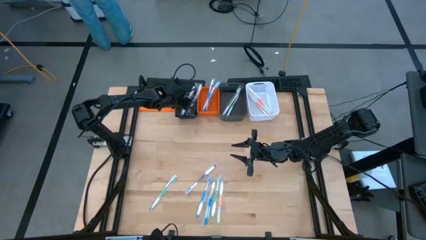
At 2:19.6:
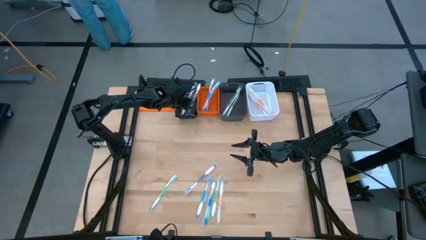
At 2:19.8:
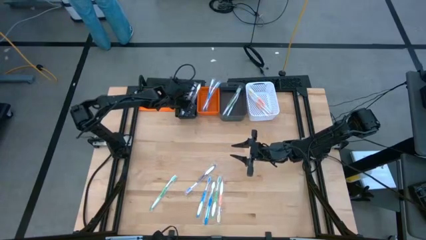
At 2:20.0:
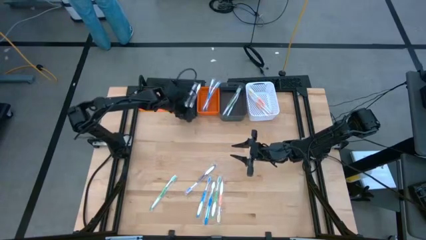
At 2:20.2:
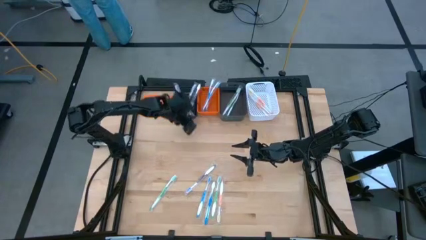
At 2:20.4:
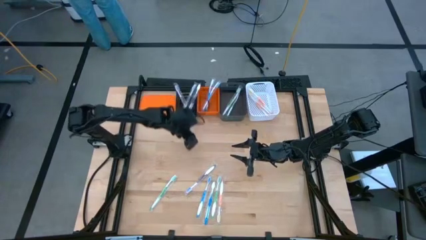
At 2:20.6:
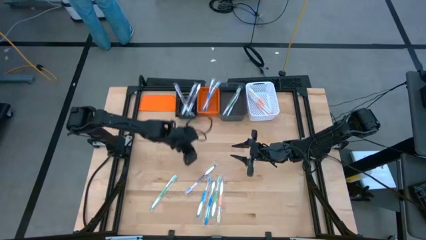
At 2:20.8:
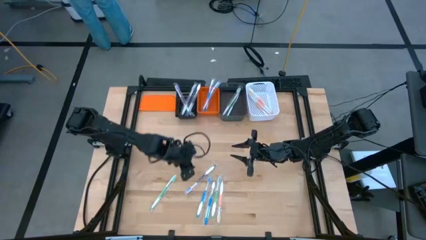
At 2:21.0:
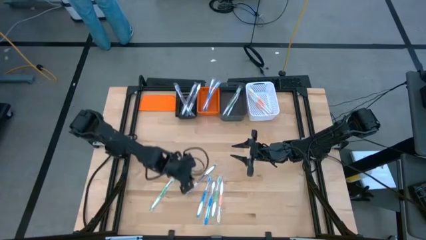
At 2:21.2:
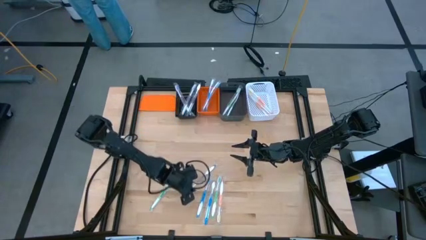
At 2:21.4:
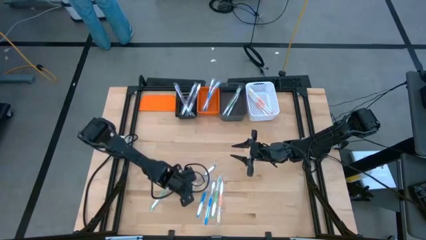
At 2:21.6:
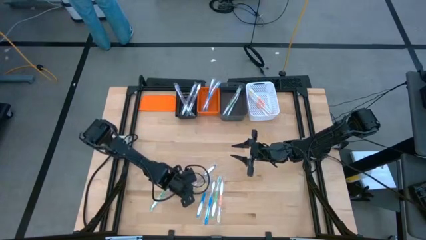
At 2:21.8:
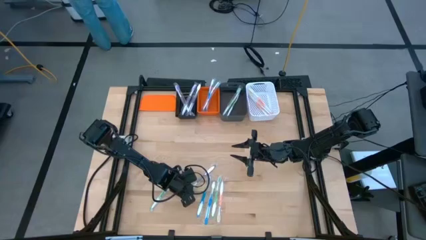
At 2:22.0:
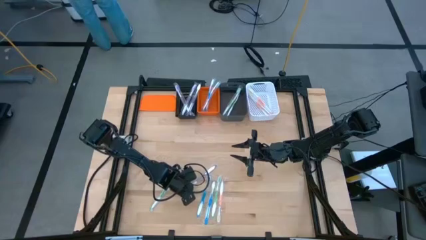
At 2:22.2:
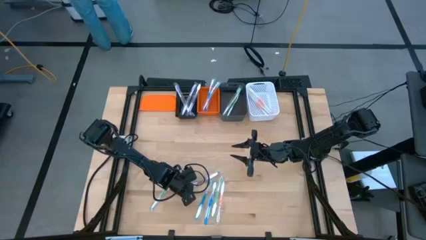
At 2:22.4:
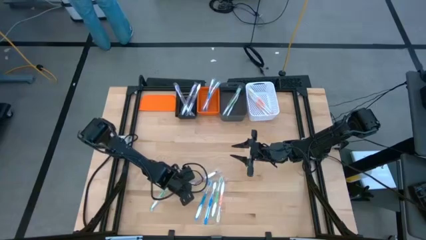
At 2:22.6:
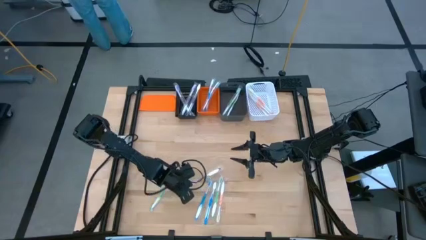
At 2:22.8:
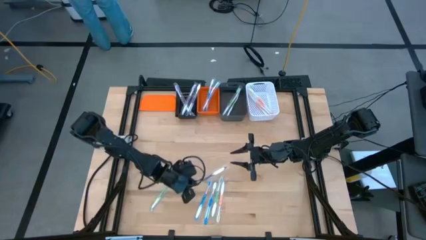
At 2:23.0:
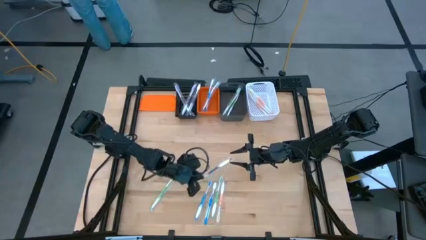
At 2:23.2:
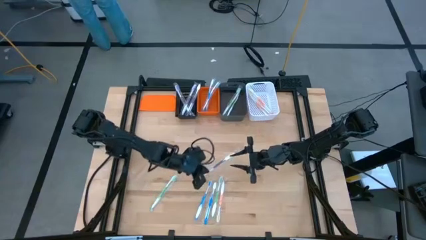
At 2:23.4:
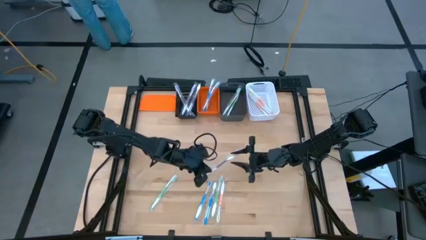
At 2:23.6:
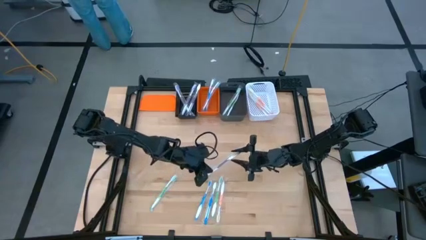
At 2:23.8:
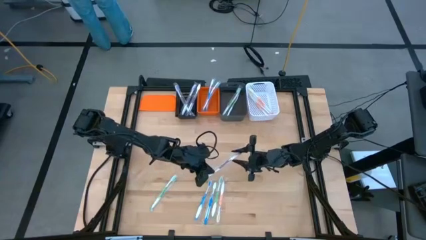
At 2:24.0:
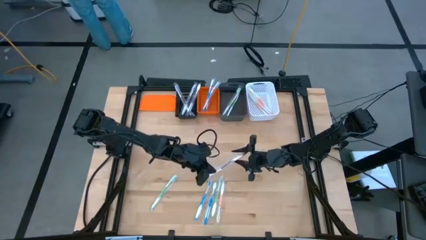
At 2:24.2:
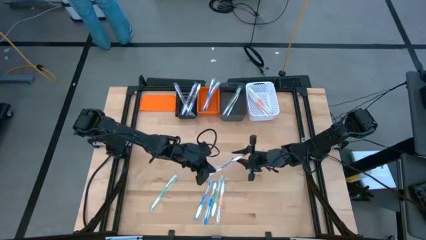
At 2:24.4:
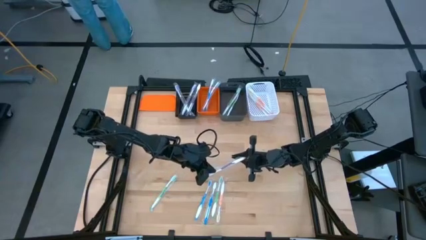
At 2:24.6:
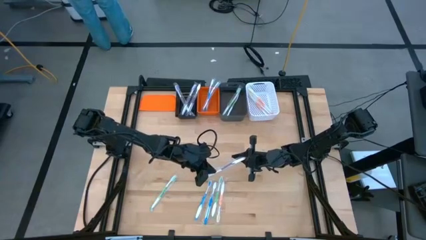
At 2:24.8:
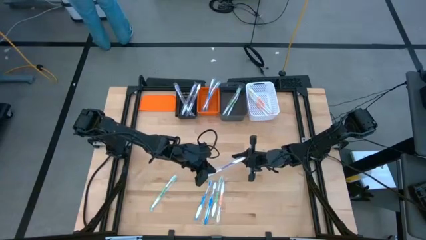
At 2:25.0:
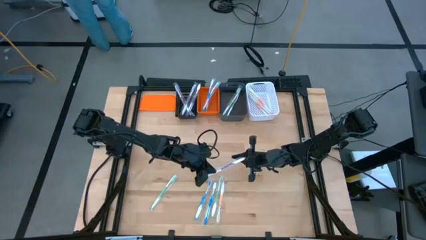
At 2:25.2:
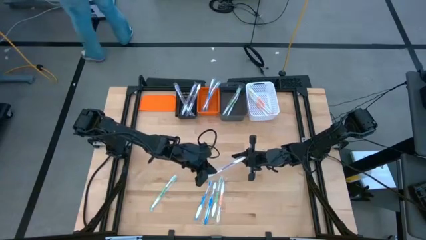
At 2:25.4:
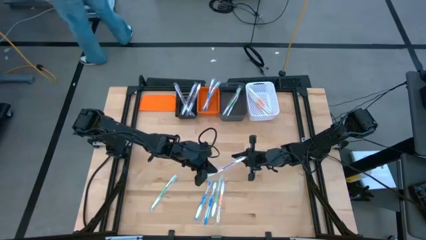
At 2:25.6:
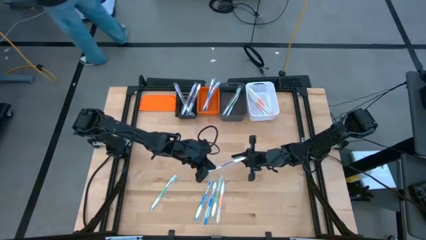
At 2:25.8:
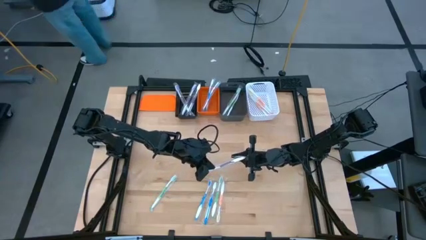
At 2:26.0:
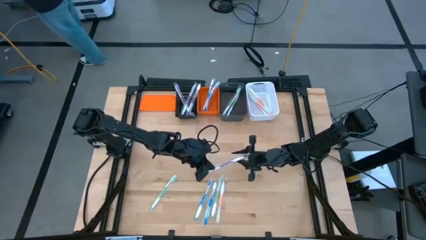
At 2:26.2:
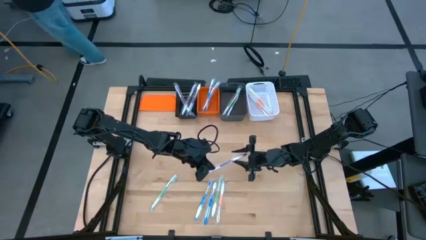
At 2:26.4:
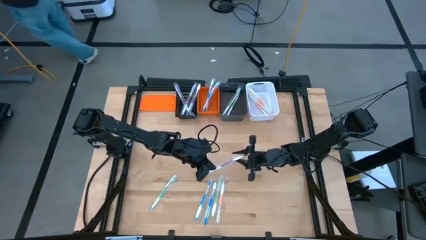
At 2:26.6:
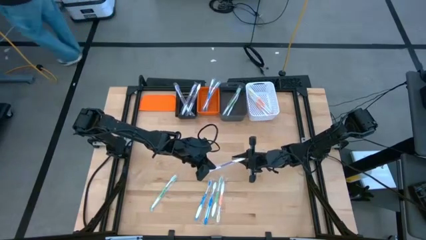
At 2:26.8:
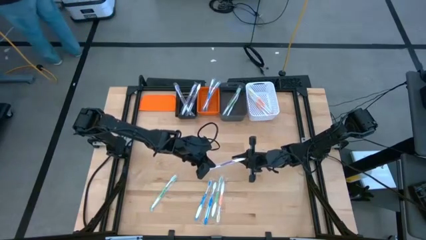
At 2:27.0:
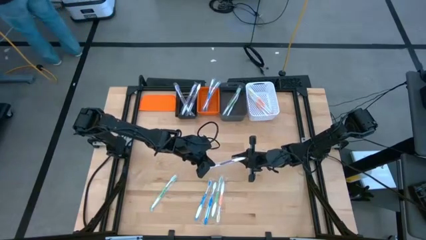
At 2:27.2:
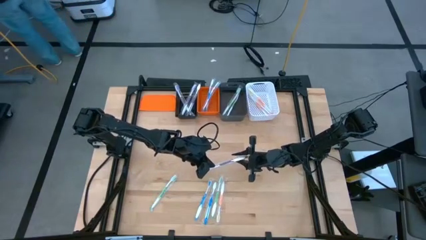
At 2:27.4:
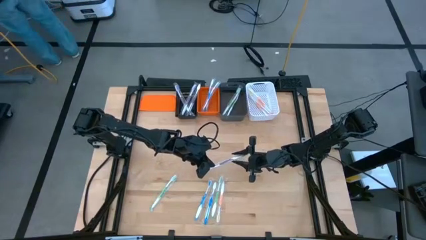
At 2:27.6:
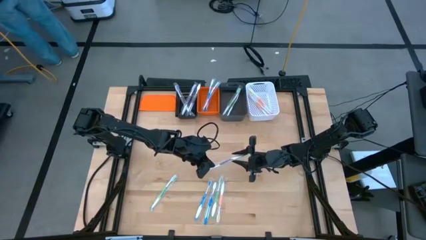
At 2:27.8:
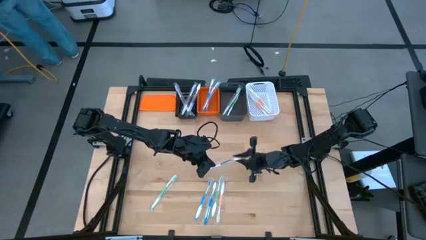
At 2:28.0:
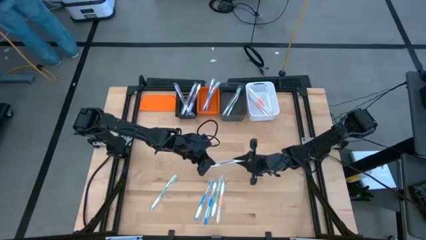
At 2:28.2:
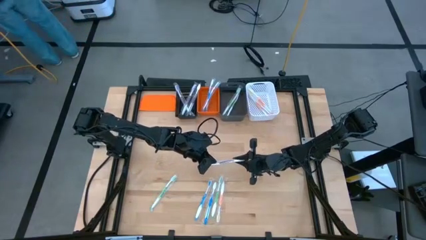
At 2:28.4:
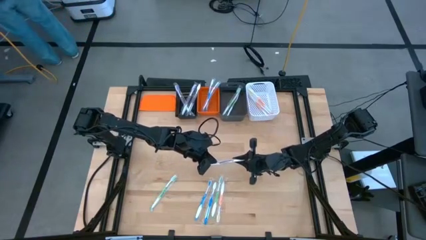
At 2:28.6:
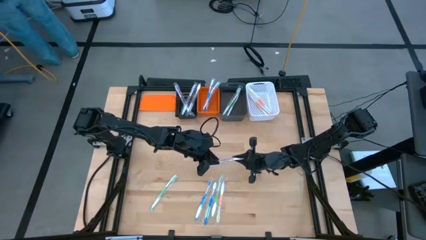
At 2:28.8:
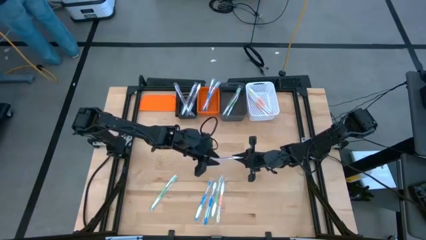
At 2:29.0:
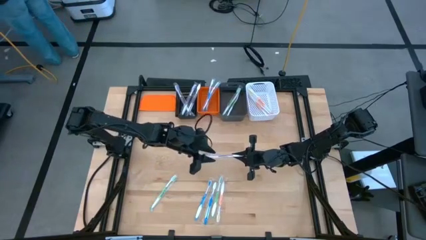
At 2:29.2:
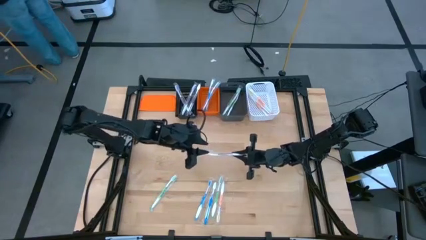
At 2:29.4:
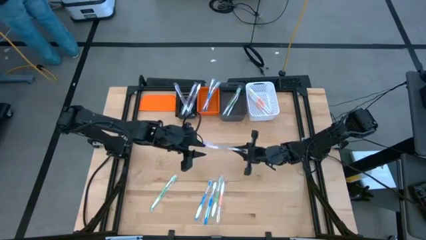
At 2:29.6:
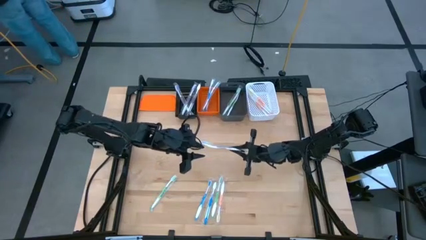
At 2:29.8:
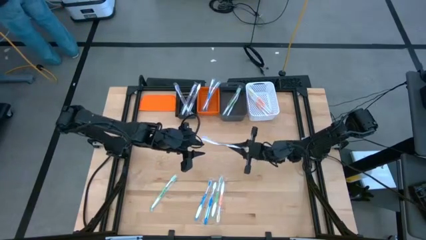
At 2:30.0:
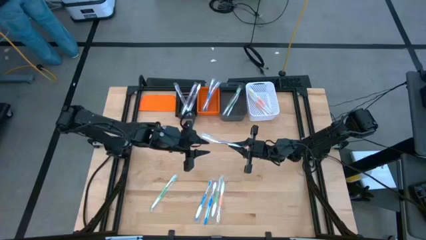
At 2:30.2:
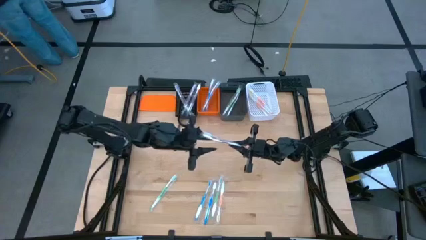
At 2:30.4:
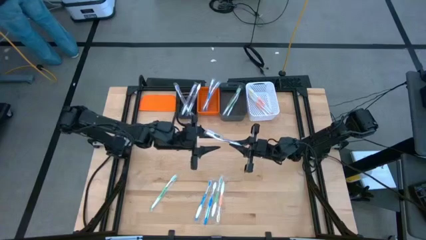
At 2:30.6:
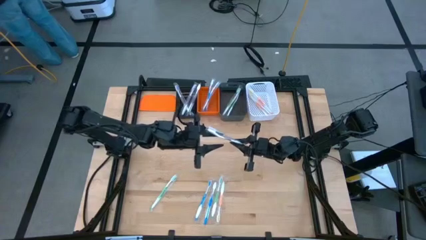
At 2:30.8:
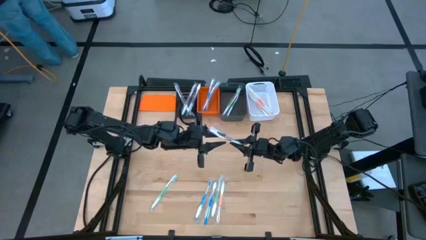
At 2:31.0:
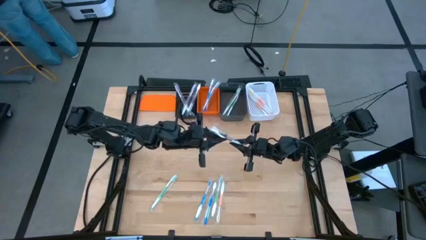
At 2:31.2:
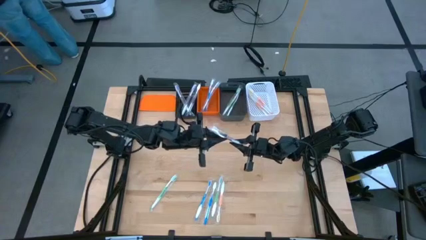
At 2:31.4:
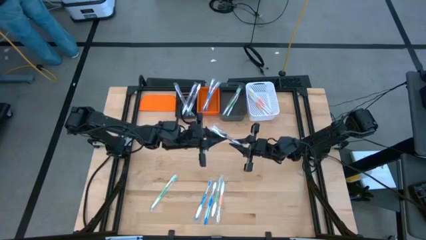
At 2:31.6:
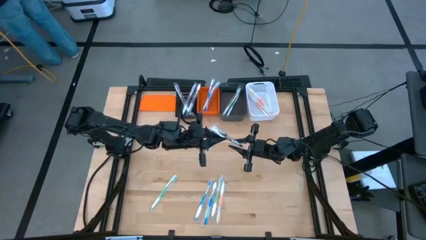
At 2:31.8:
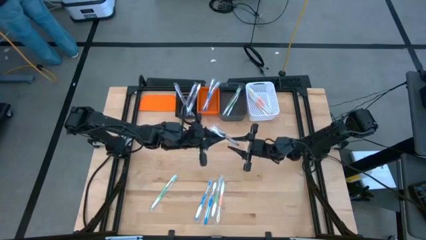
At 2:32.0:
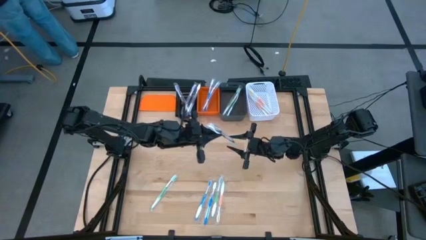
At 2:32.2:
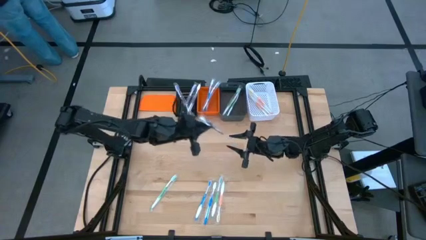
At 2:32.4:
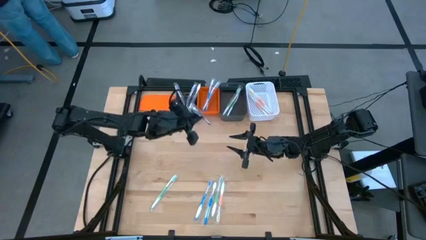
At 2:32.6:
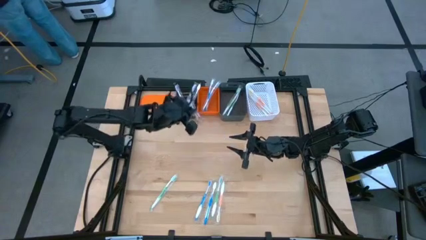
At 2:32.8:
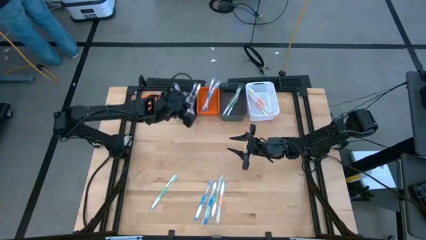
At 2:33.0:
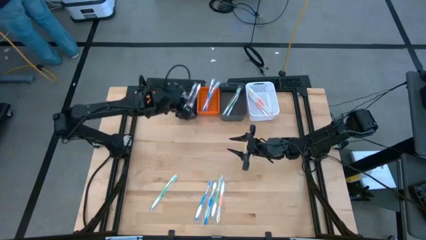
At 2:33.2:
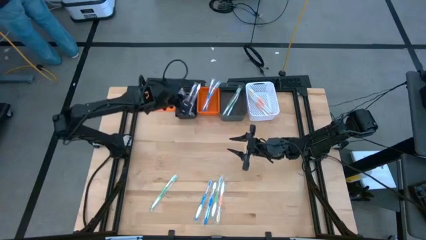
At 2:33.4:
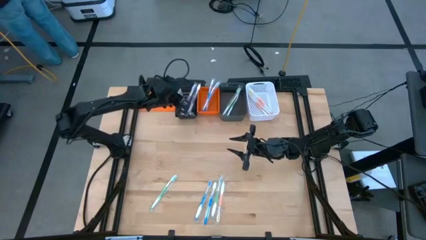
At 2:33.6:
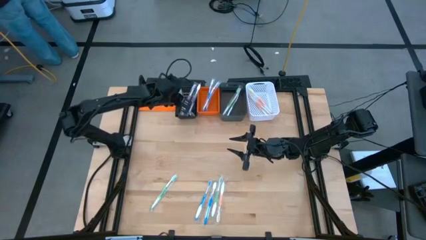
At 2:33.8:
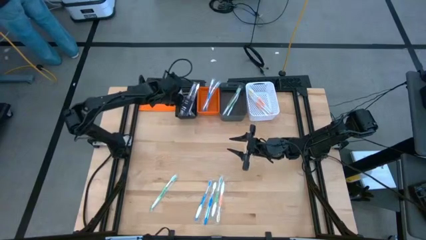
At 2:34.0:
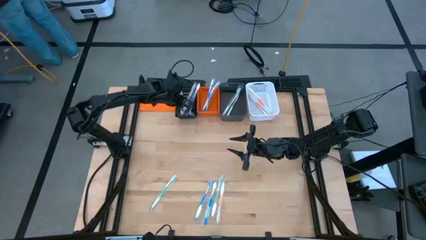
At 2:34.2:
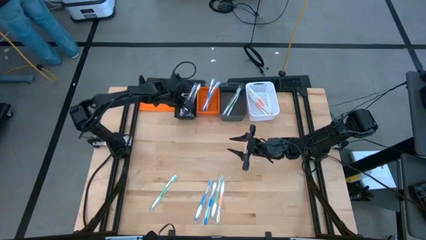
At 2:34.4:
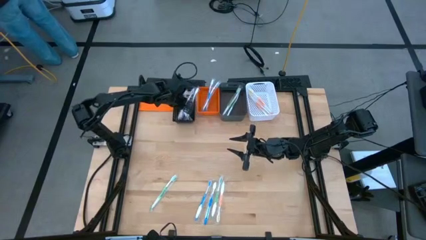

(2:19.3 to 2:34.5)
Task: Pick & Place Toothbrushes
Put the violet toothbrush into the black basket

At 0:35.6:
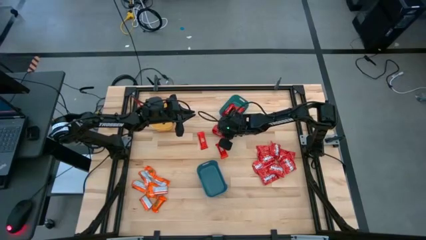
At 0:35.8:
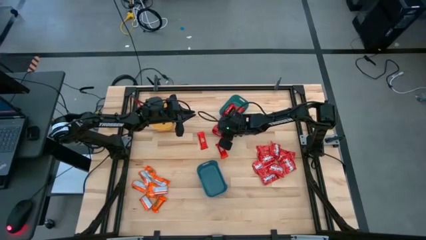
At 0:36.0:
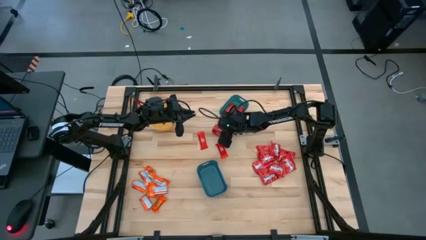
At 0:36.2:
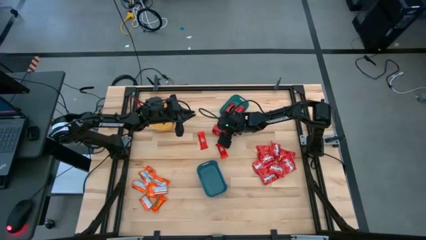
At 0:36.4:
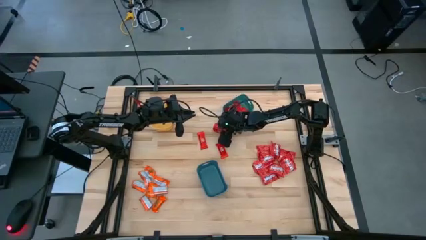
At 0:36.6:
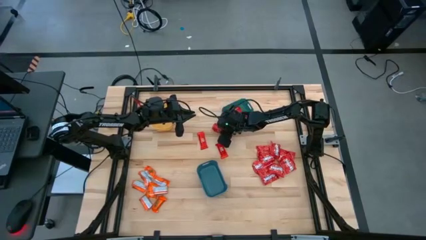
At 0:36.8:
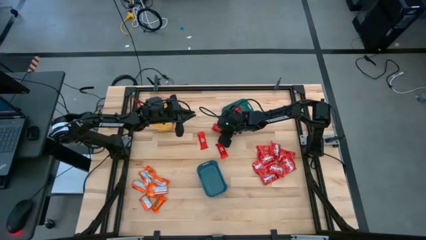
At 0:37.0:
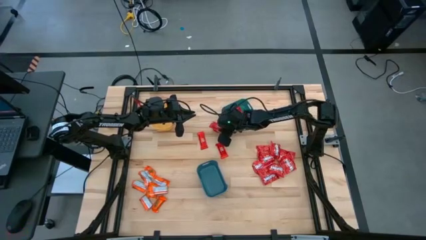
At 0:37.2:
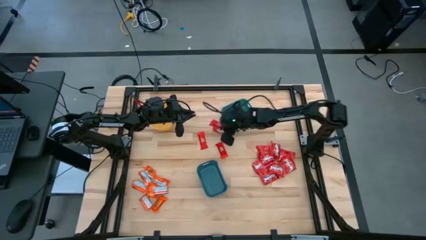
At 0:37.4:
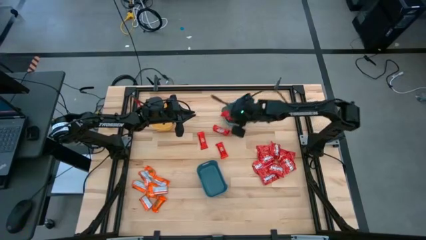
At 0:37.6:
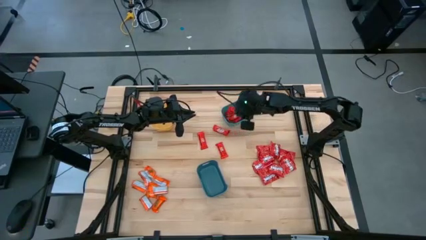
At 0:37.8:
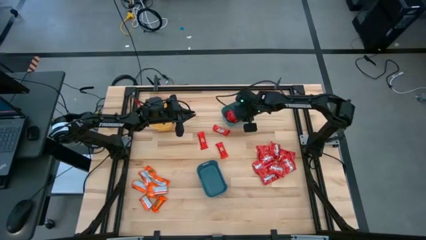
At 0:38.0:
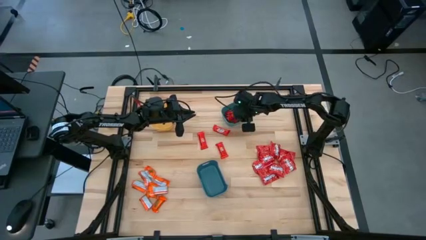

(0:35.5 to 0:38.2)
Task: Sort candy
Put the red chocolate bar into the green bin
